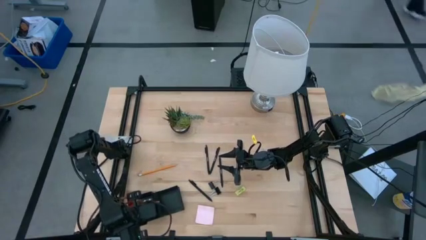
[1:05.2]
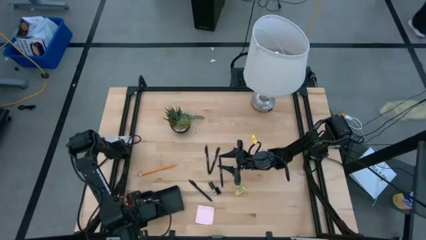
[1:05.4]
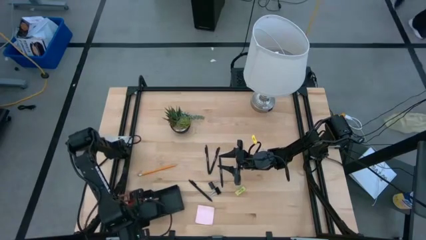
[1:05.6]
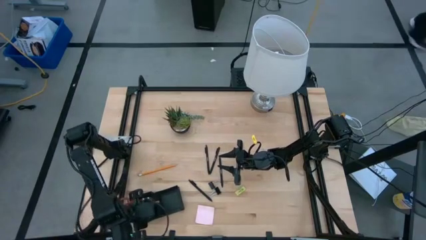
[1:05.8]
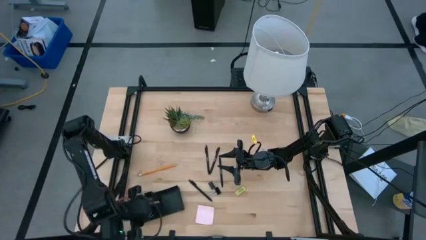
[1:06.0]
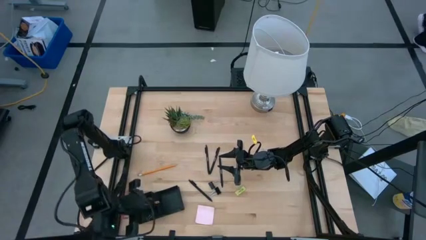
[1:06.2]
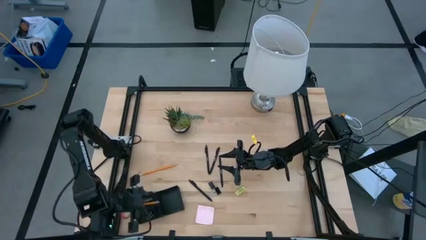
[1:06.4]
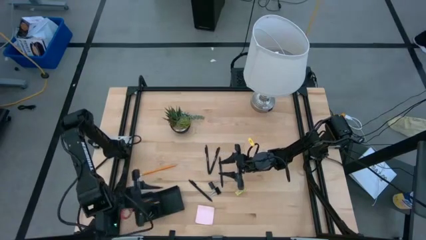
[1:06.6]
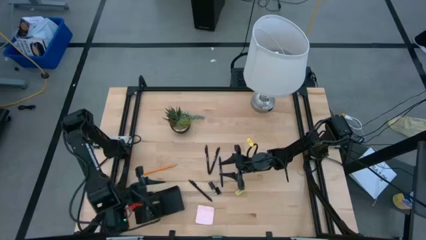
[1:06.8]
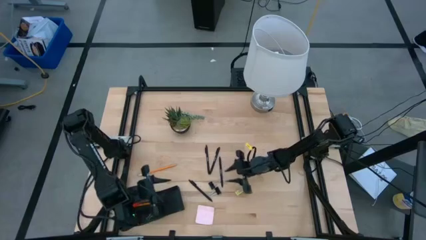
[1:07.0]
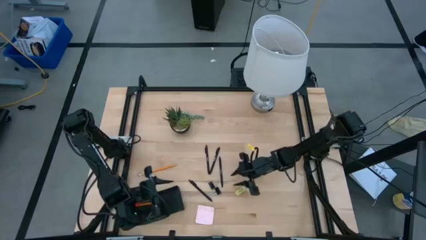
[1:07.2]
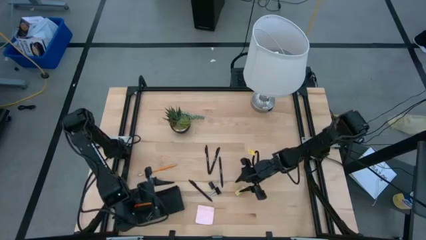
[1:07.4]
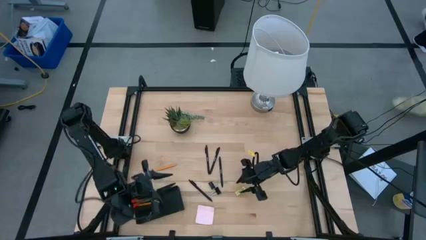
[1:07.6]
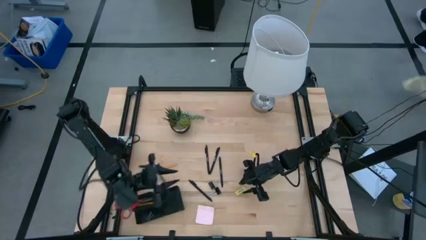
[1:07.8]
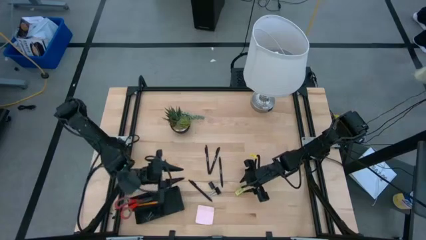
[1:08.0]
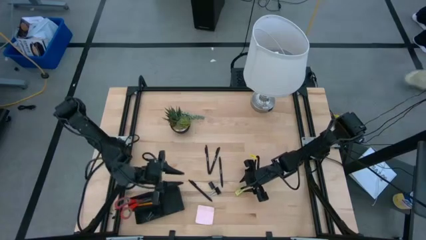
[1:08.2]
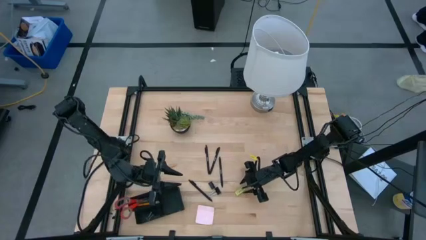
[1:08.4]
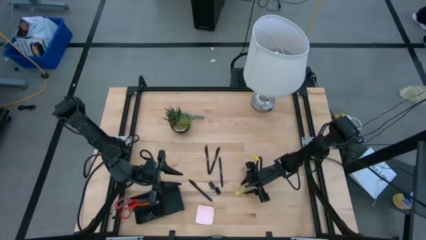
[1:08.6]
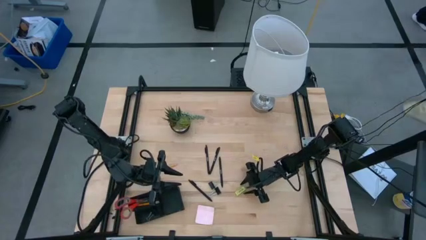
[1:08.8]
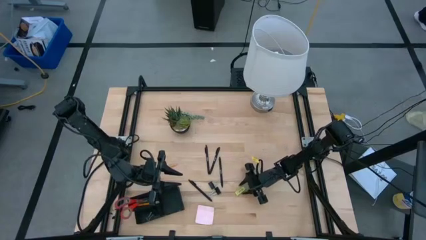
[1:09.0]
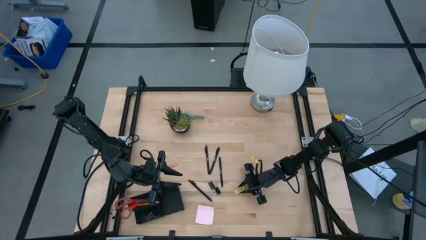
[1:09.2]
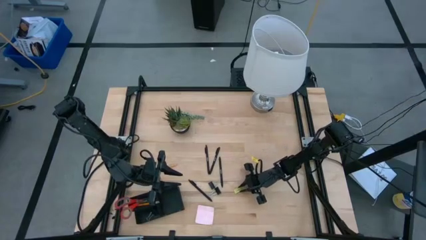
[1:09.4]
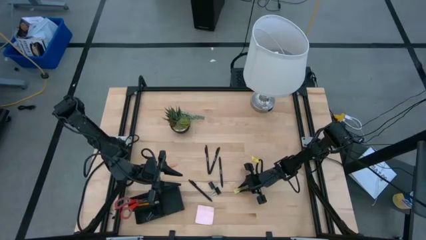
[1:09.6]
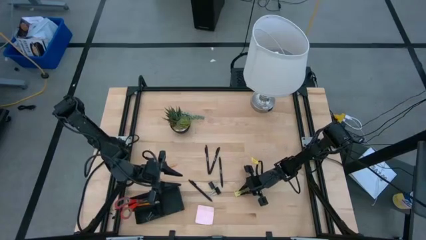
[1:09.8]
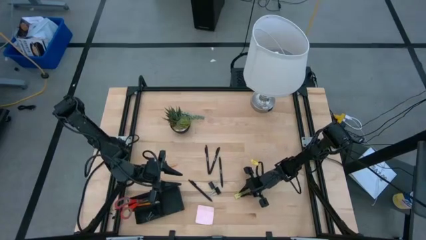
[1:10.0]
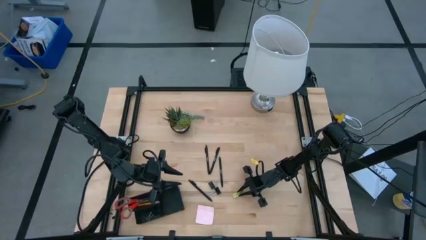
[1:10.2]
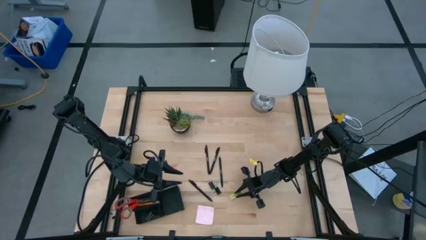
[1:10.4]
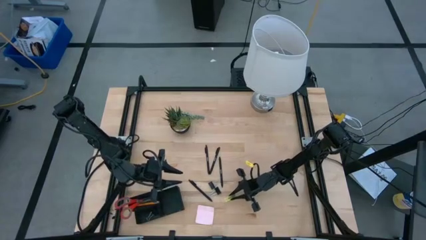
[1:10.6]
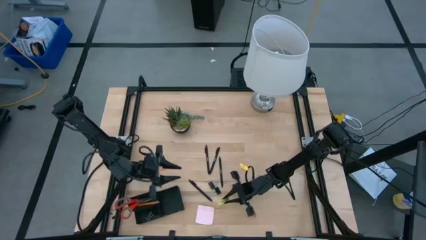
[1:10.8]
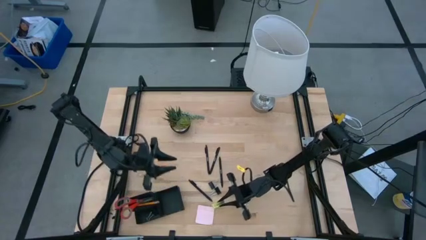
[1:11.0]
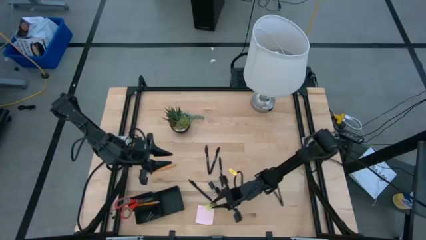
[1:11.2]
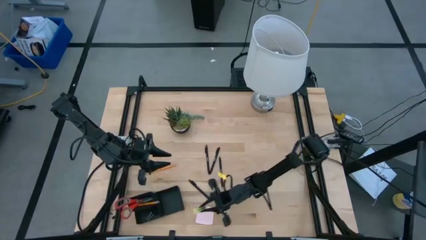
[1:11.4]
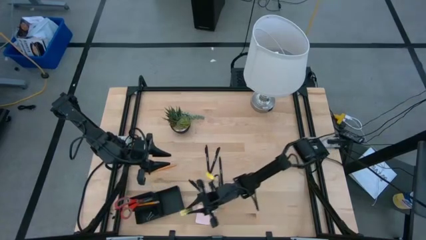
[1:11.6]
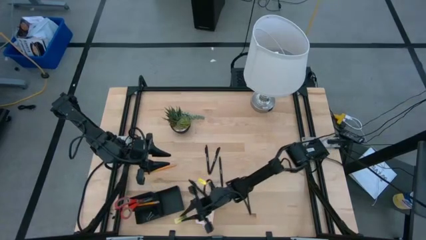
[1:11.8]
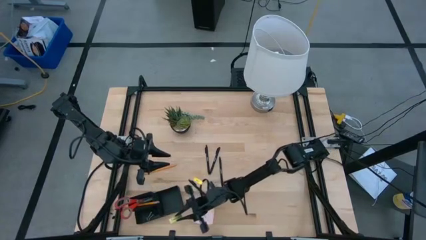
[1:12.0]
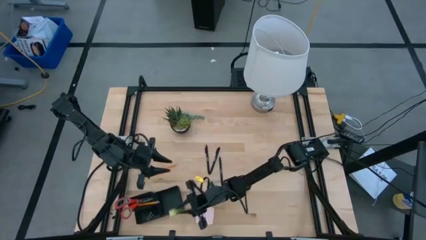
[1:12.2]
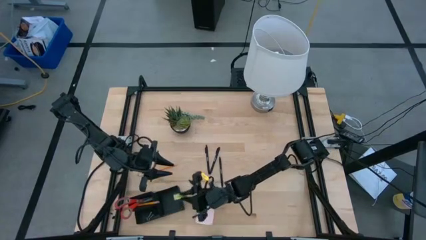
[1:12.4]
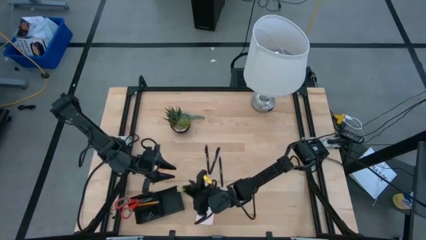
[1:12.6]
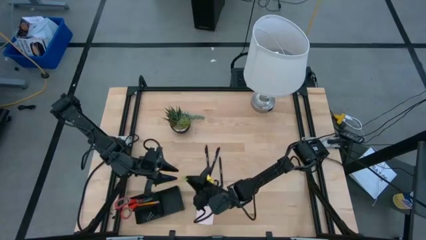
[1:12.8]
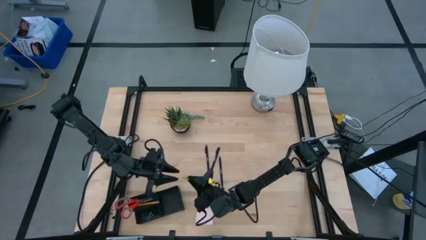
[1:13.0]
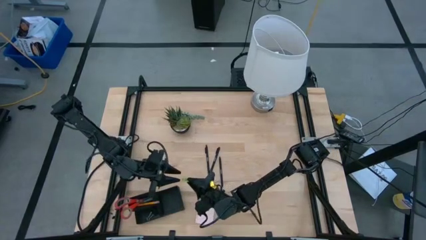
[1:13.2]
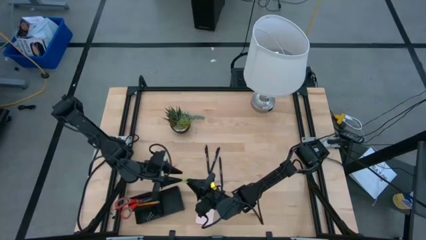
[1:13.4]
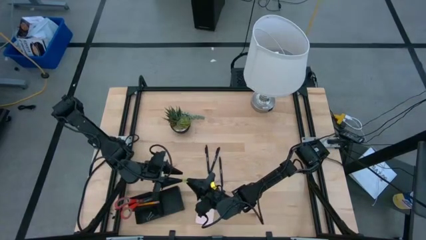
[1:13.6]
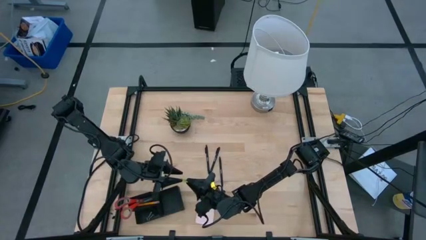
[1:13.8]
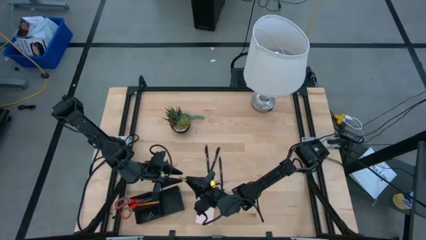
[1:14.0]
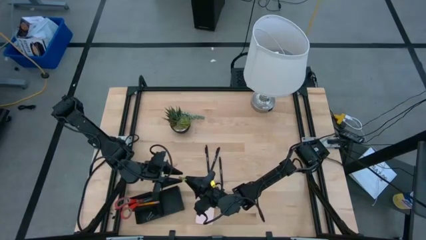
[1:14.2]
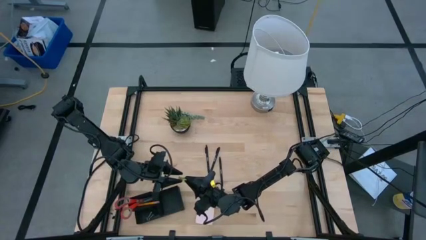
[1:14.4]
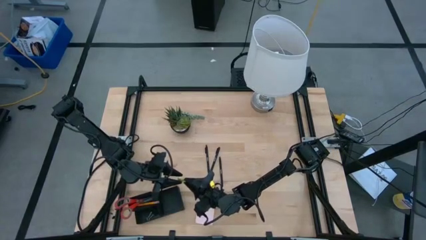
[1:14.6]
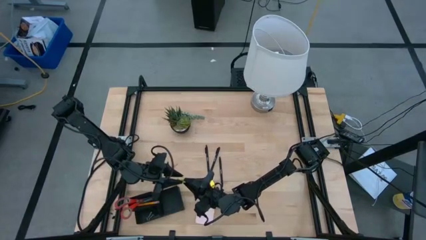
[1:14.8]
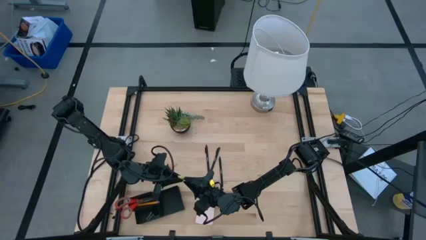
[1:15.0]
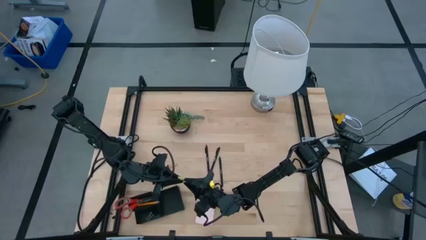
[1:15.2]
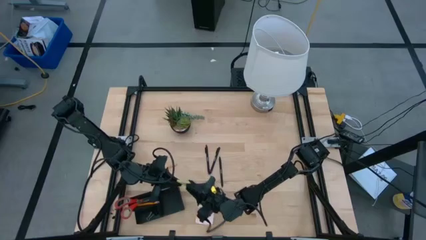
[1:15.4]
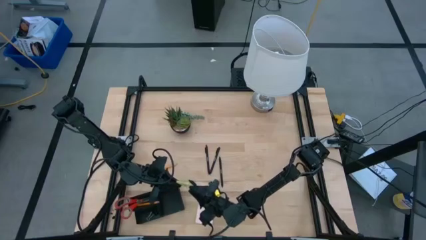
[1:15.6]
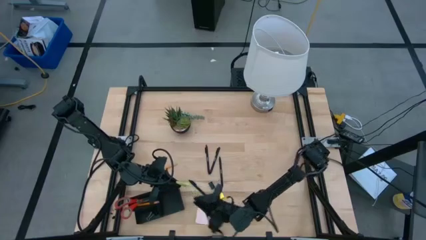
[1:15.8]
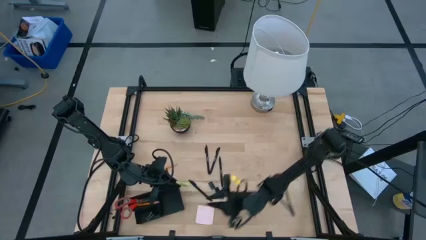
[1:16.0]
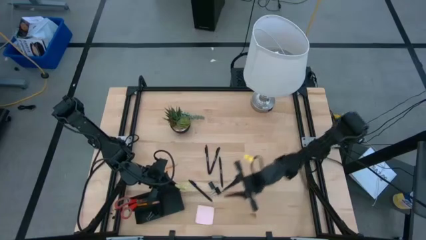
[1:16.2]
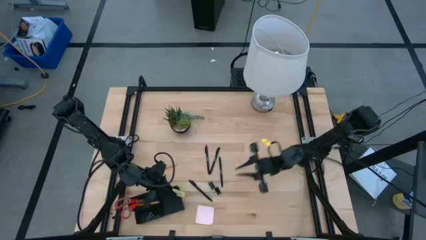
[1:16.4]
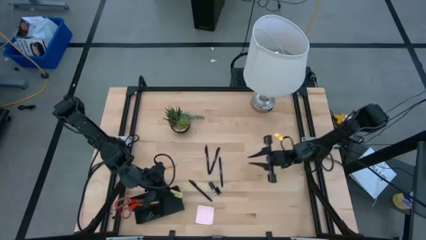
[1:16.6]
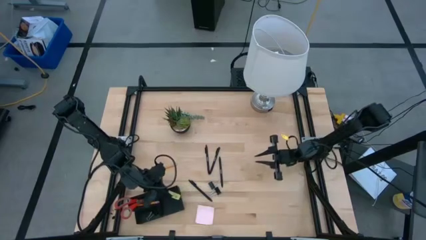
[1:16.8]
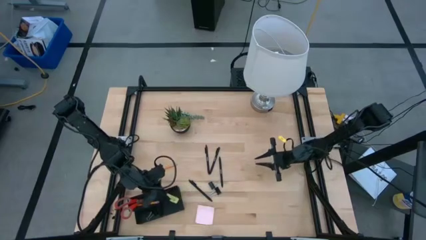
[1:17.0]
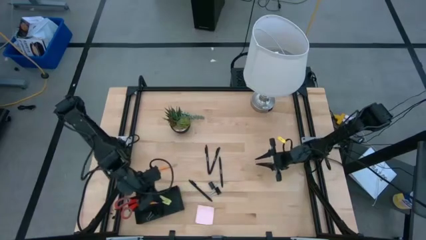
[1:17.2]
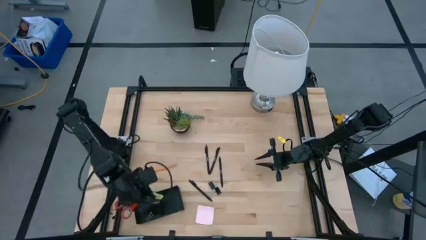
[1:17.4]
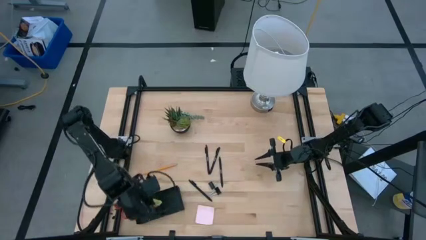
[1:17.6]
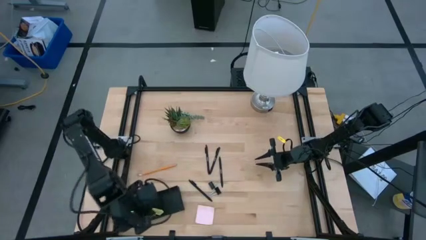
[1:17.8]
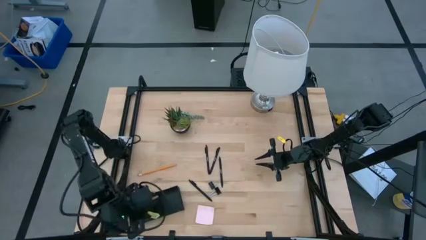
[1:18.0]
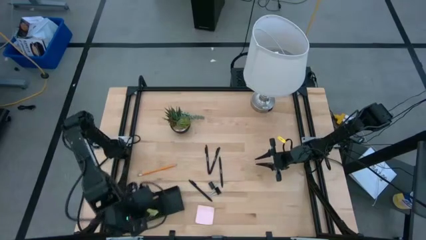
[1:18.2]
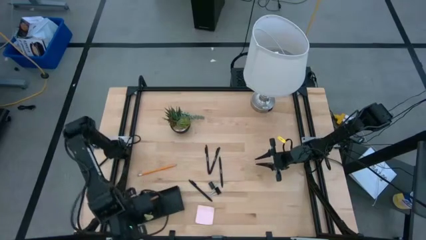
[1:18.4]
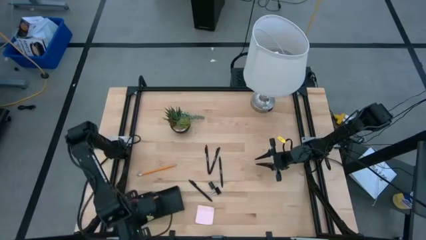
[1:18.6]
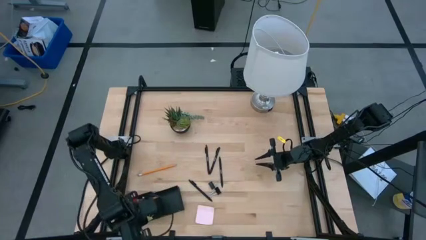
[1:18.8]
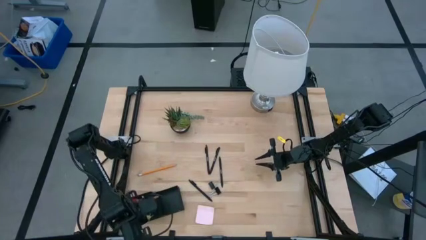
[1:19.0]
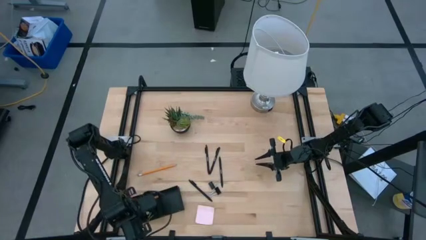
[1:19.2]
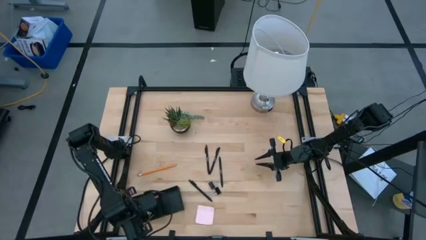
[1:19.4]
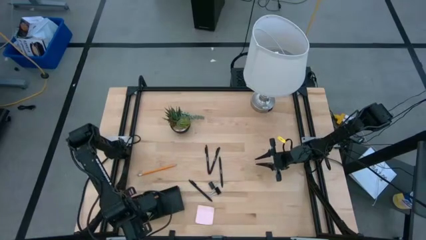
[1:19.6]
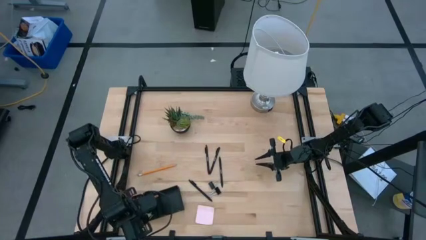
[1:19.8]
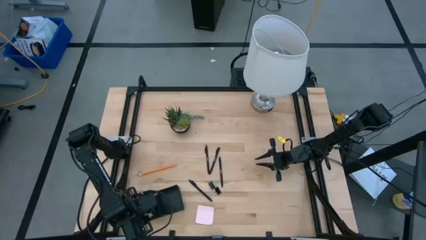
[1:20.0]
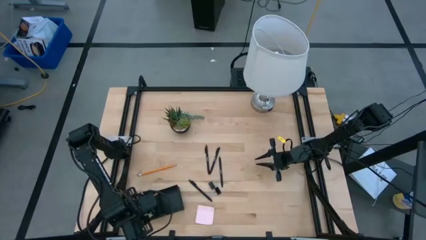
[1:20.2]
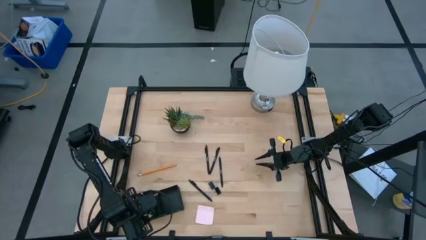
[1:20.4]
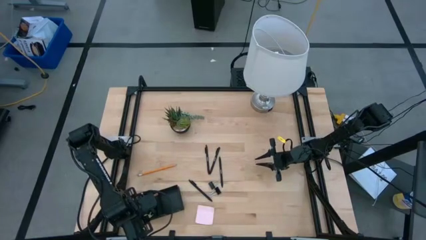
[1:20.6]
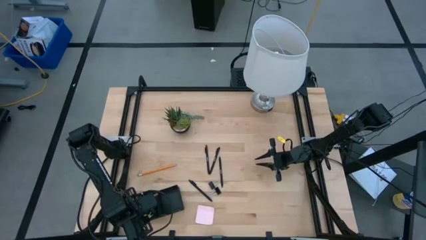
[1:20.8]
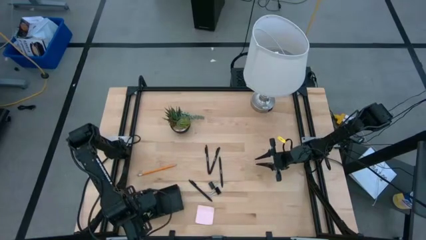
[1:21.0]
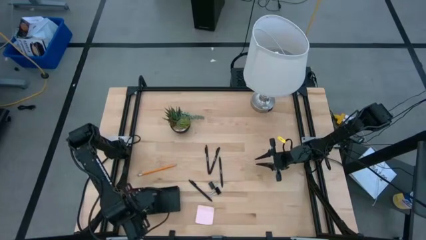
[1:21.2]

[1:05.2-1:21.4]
Task: Pick and place office supplies into organizer
Put the eraser into the bottom left section of the desk organizer

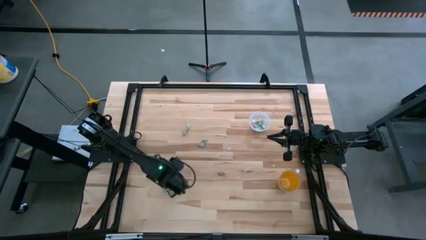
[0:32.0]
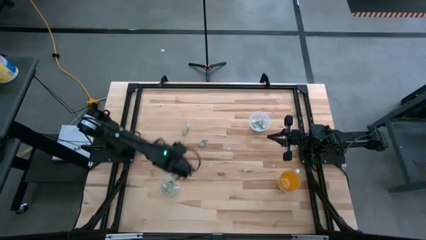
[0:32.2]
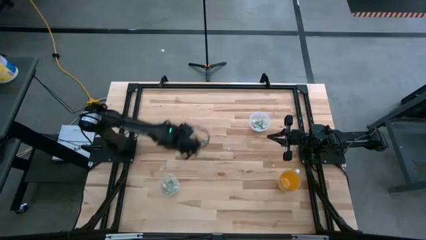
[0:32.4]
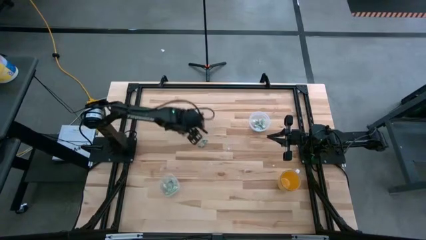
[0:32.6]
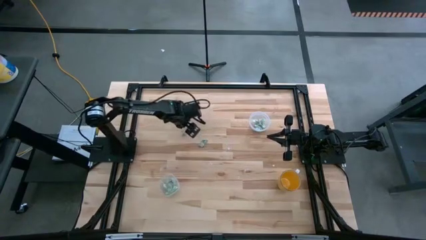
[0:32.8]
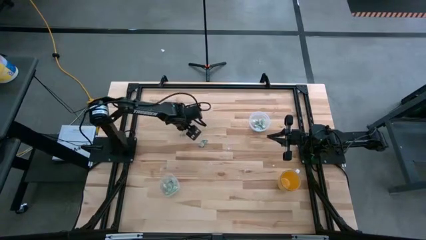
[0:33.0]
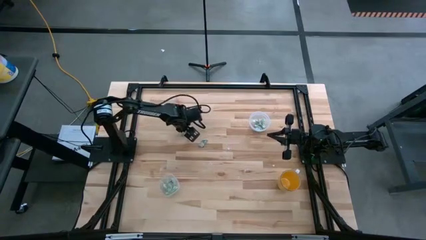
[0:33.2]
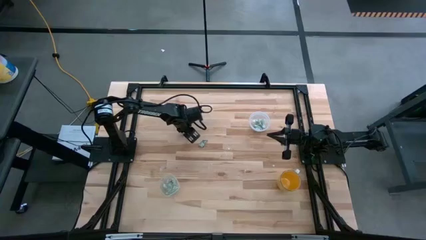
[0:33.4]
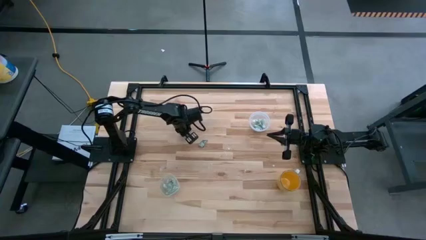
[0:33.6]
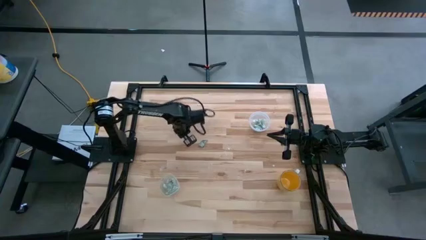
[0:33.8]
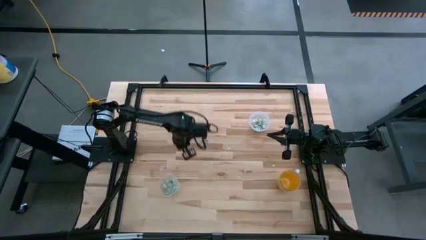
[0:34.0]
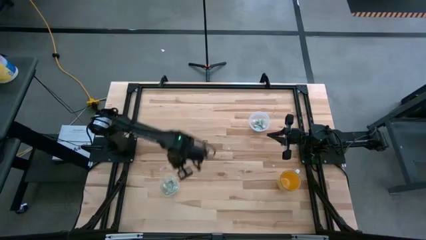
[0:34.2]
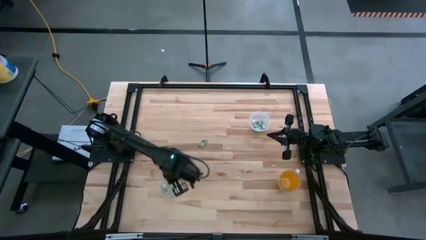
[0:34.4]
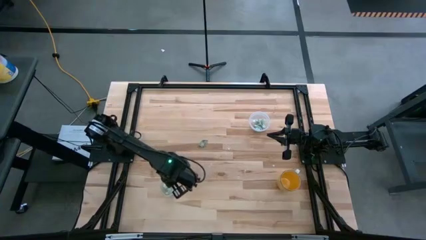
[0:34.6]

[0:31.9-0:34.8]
Task: Pick and place Stevia / Truvia into bins
Put the stevia packet into the oval transparent container
